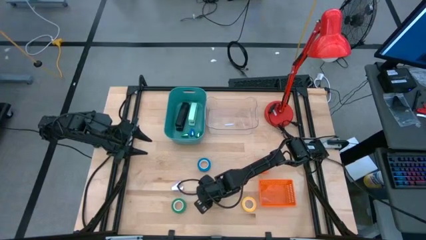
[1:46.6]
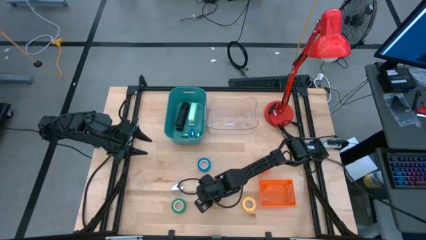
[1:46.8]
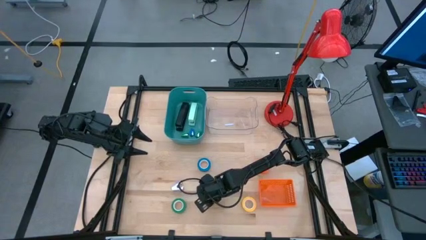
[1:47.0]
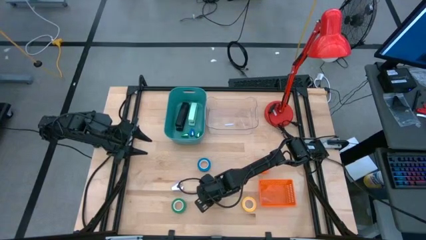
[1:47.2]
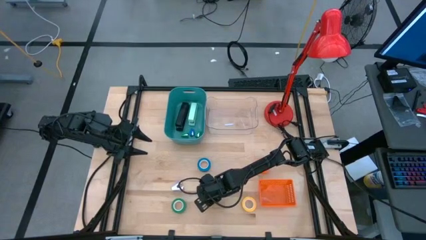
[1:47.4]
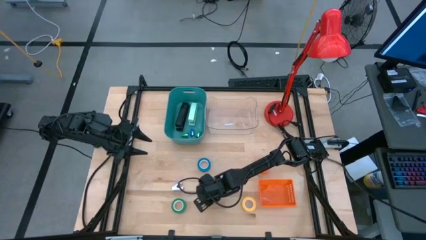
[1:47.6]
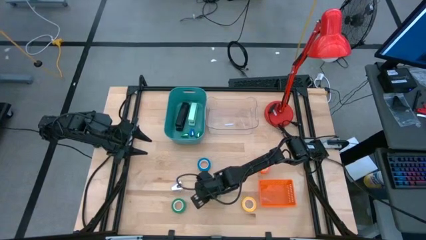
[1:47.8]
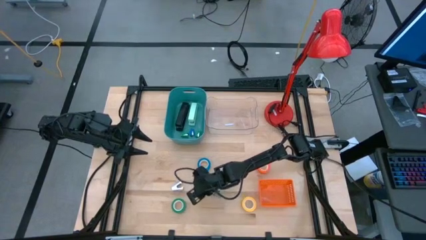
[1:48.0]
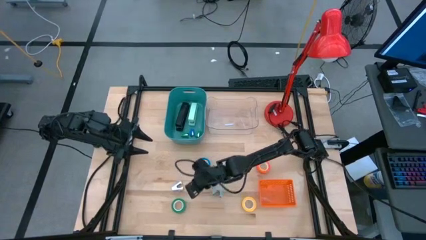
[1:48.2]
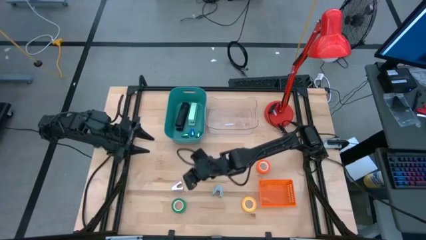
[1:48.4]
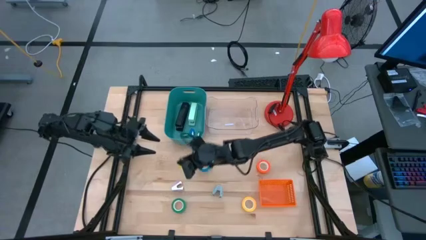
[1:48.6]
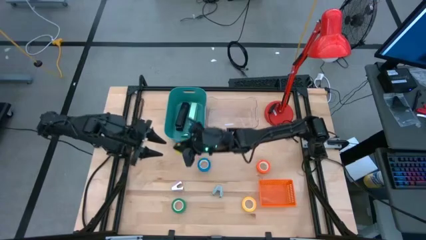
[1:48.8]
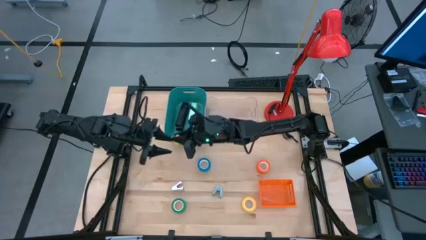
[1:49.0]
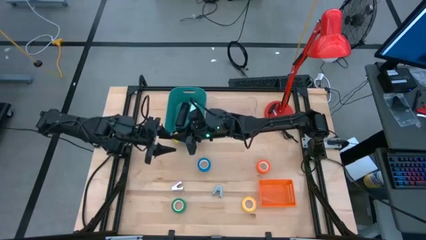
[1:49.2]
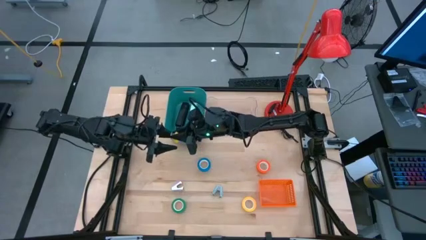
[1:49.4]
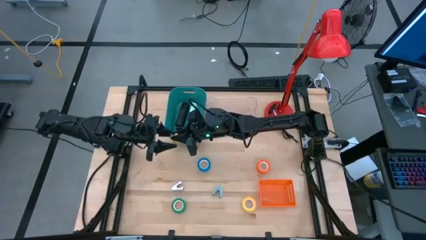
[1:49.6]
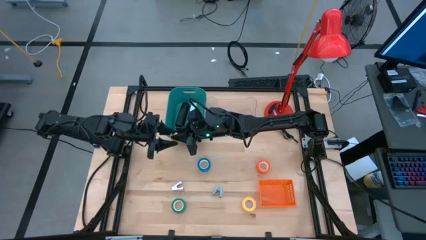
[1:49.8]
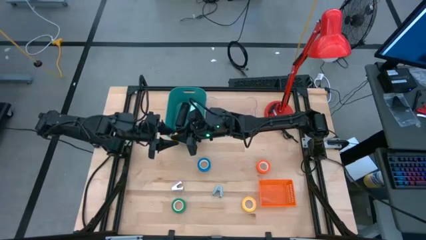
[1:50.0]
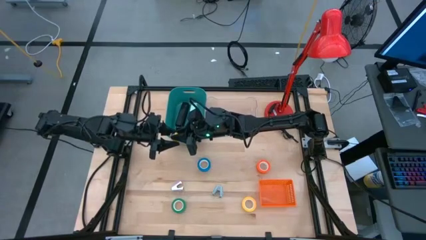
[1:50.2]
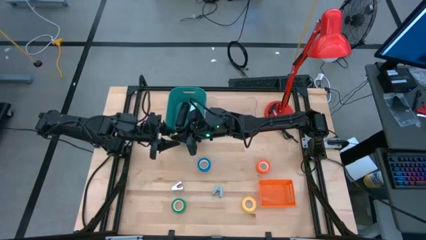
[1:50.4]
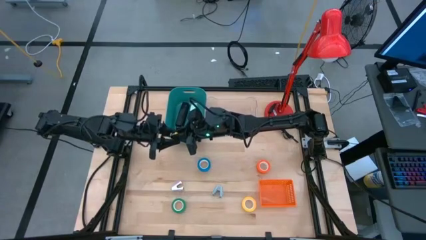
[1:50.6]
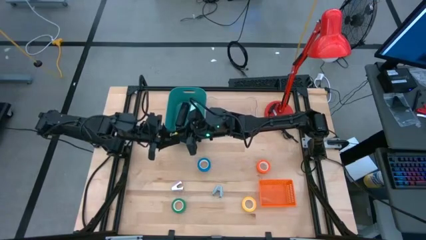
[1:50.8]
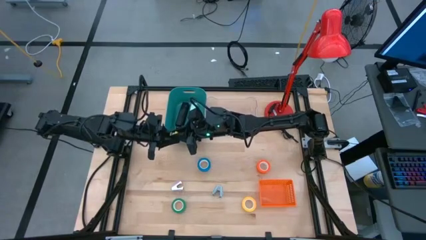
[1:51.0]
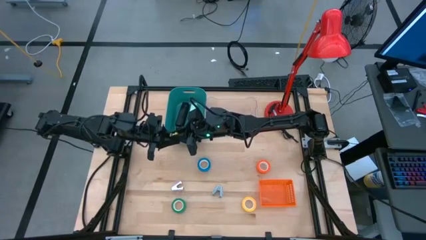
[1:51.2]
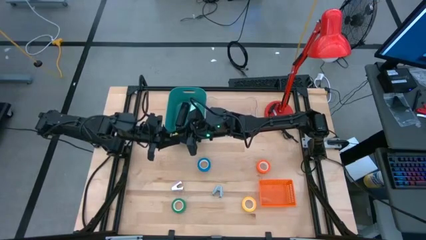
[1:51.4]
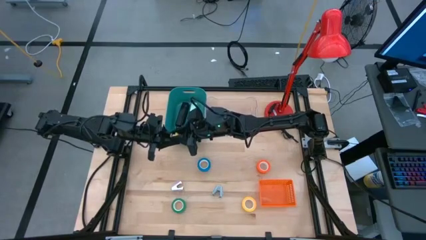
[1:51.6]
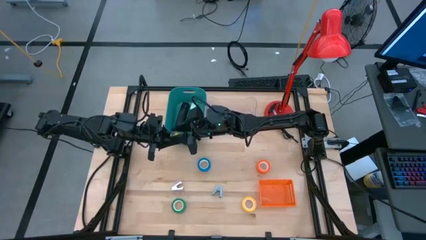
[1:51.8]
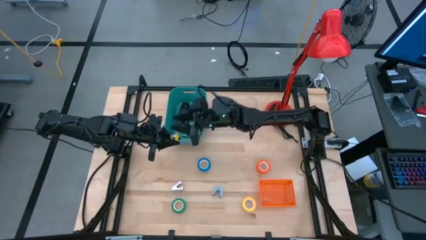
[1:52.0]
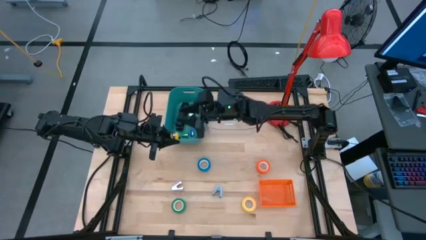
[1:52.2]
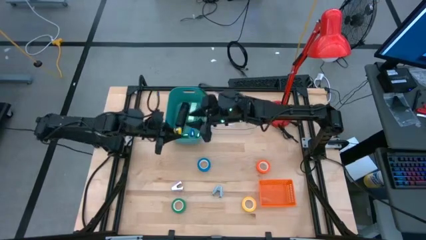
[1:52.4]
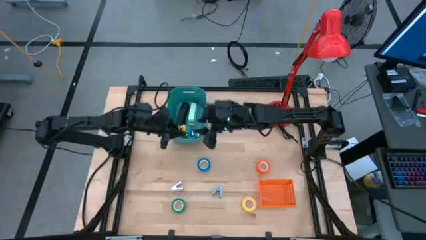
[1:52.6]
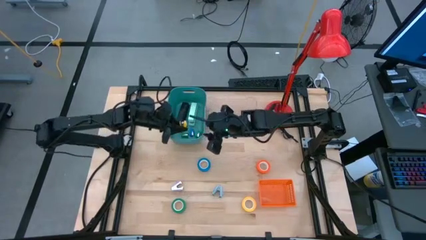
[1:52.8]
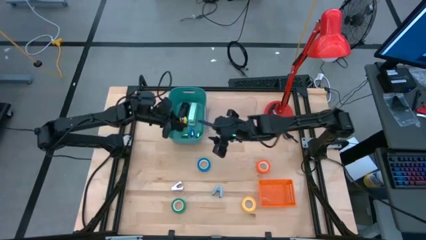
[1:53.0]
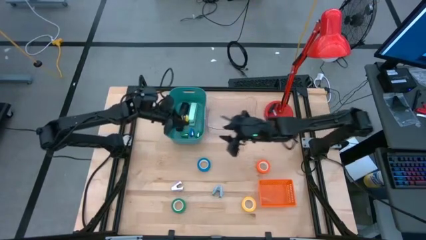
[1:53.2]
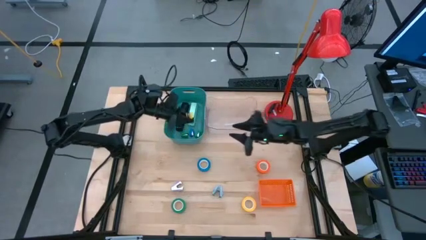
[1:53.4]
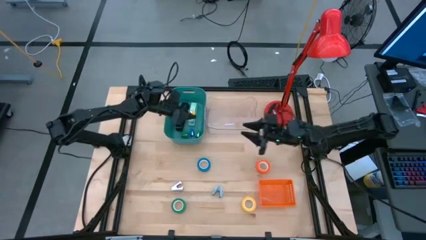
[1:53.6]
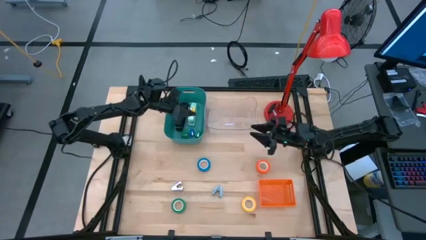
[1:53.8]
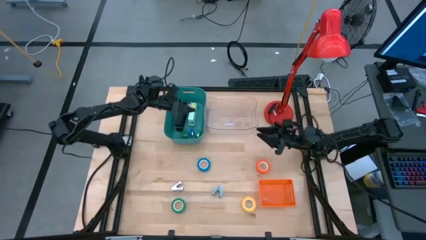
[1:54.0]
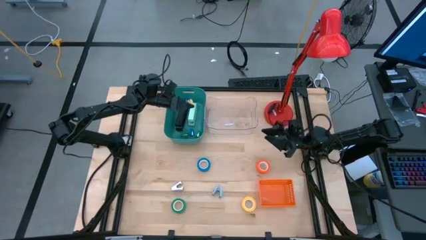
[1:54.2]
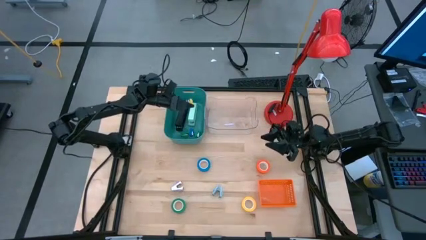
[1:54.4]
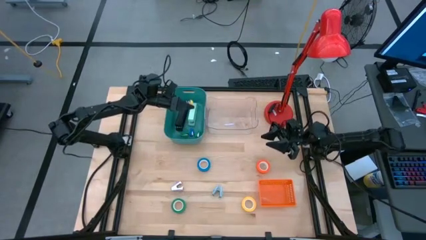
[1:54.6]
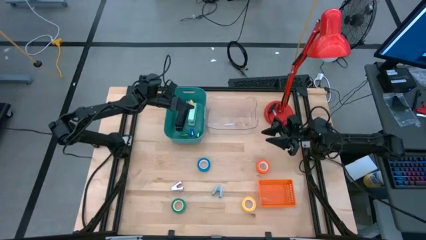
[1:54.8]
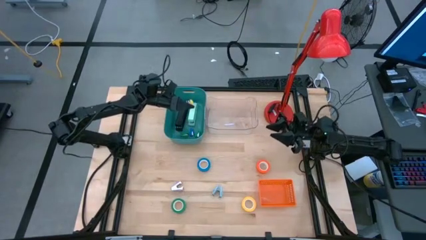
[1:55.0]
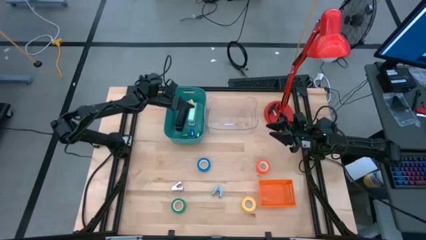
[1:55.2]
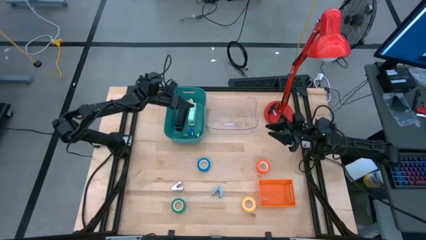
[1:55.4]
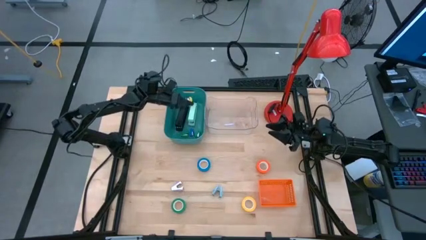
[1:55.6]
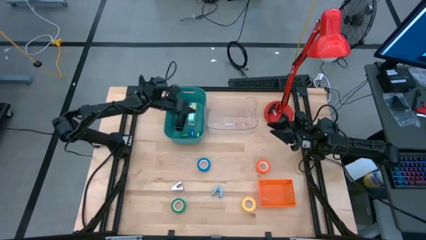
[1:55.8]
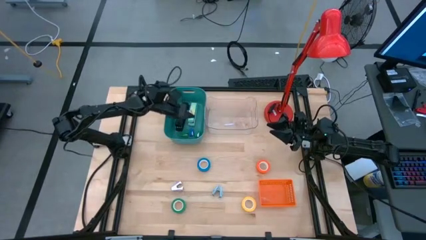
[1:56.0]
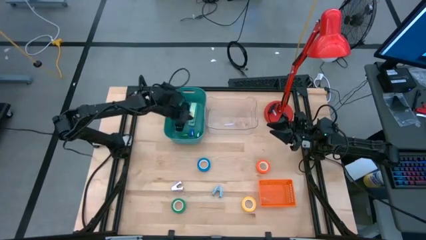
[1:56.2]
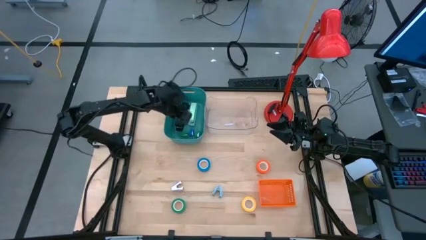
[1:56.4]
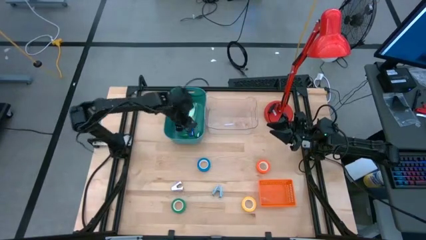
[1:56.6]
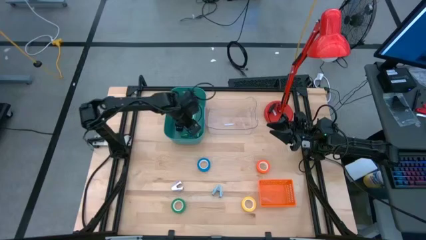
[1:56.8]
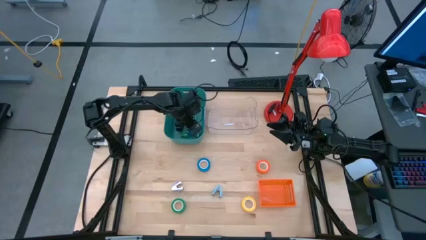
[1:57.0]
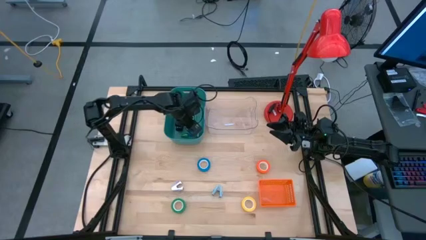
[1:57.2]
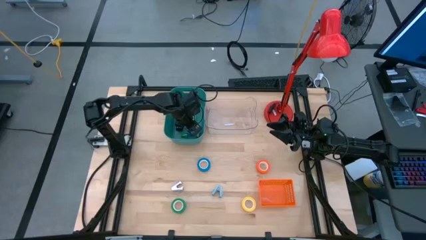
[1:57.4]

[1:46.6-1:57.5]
Task: Pick and place Stapler, Stapler remover, tape
Put the mini yellow stapler into the blue bin

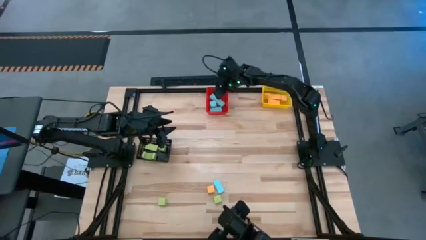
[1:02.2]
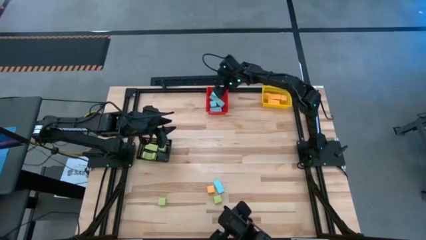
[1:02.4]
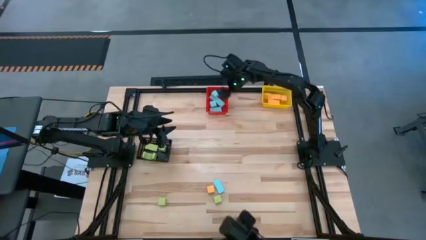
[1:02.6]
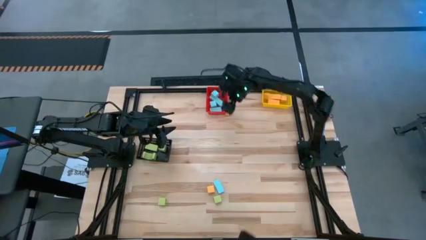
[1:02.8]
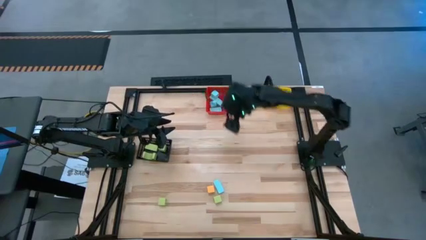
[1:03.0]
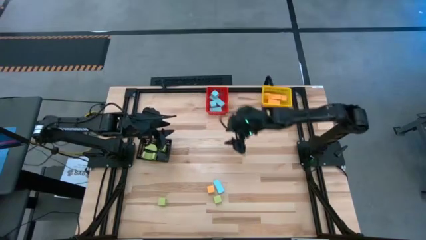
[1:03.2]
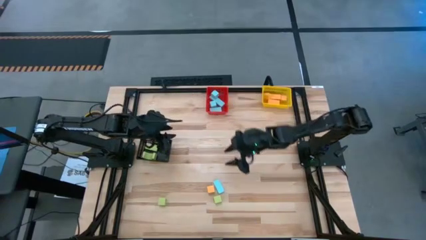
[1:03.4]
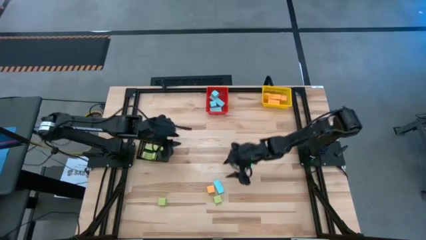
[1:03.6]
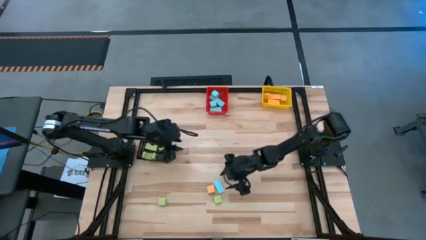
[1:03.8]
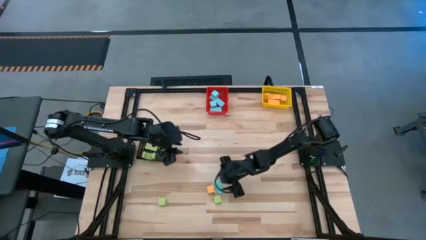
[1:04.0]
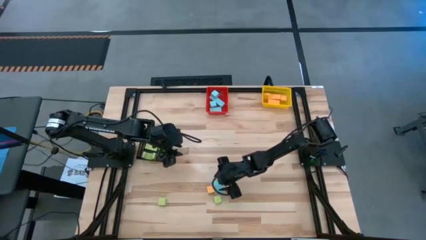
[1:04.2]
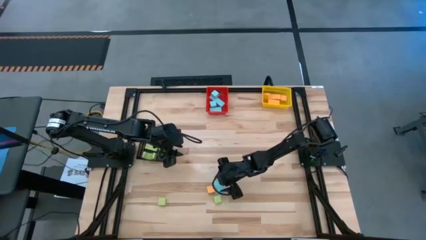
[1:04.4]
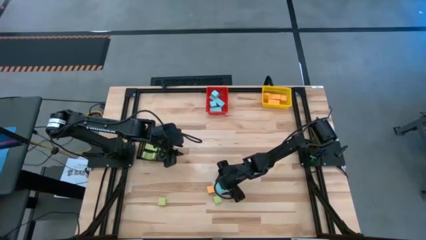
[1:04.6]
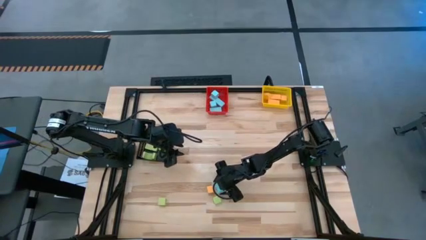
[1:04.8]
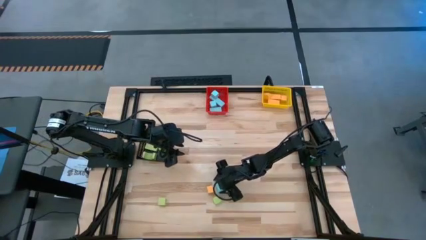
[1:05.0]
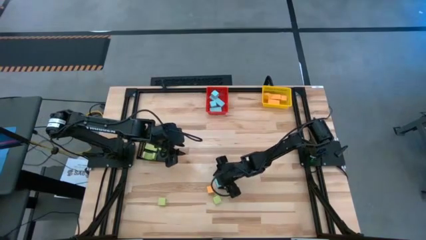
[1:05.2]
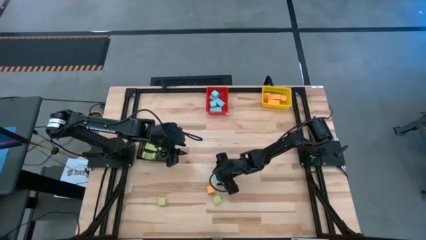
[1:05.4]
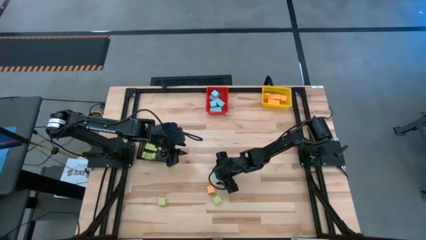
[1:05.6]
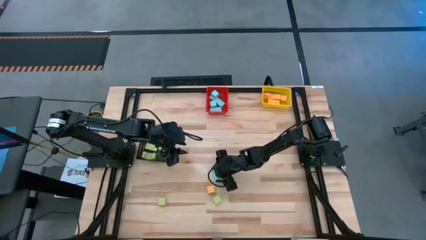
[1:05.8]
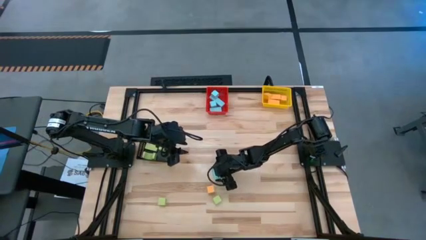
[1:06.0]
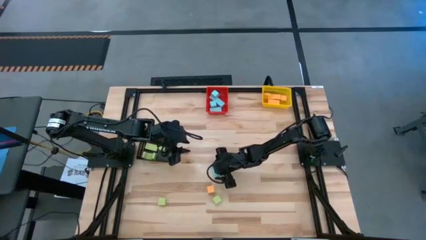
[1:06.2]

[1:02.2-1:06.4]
Task: Sort & place blocks by color
Put the blue block into the red bin

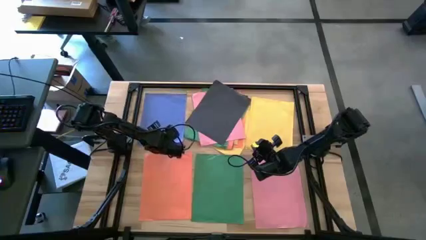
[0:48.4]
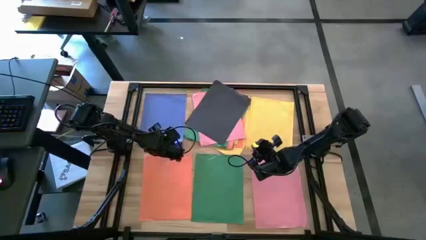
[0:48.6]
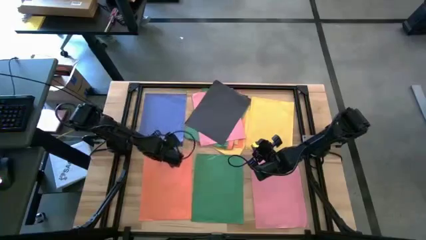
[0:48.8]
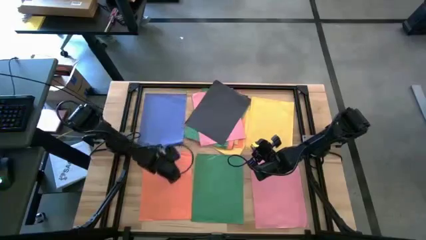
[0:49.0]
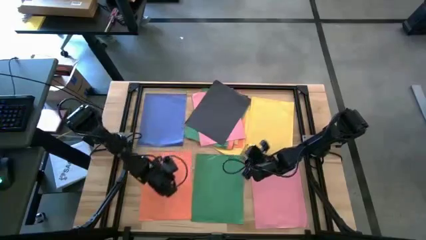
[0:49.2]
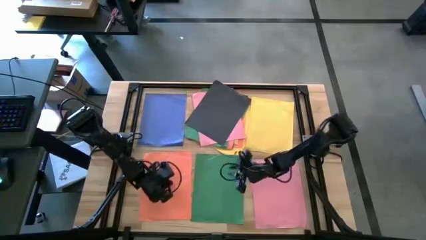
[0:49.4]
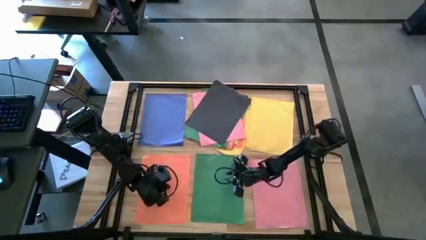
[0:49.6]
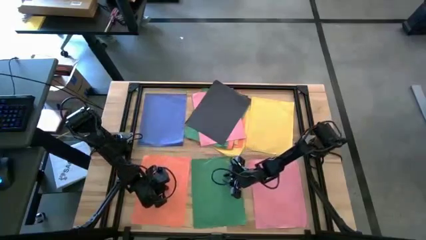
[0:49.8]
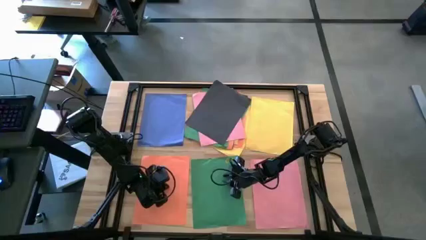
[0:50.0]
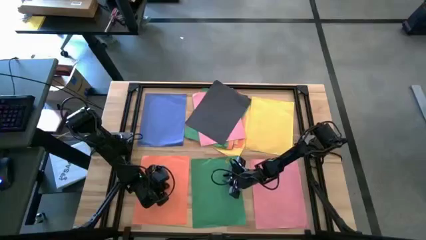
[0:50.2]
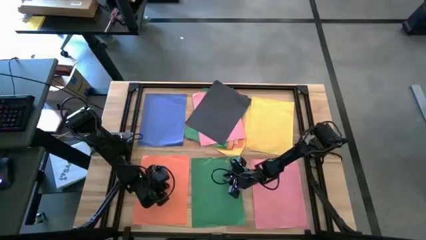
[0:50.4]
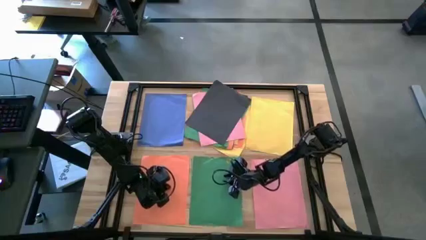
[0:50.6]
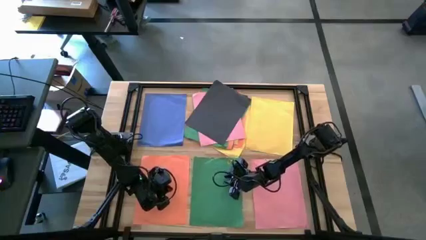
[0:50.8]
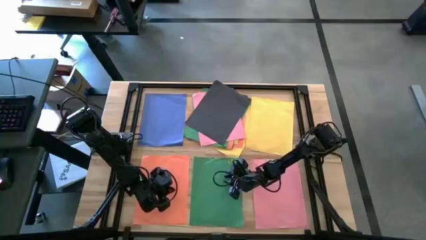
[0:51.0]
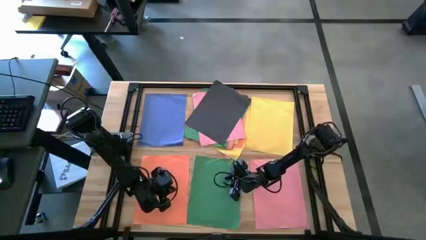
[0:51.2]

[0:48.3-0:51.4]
Task: Organize paper
Adjust the orange and green papers
